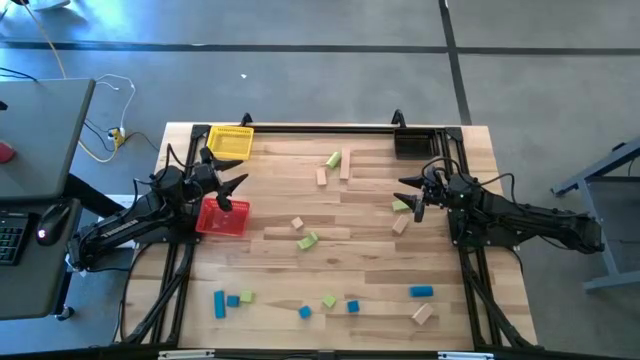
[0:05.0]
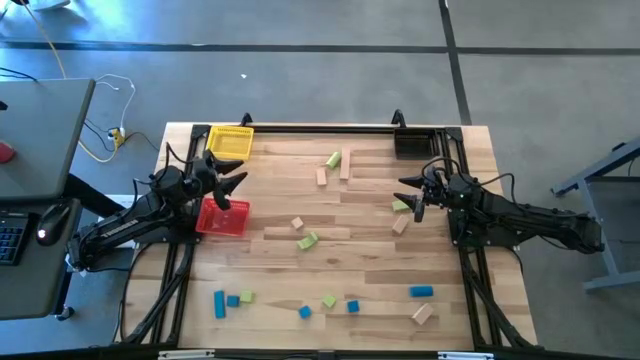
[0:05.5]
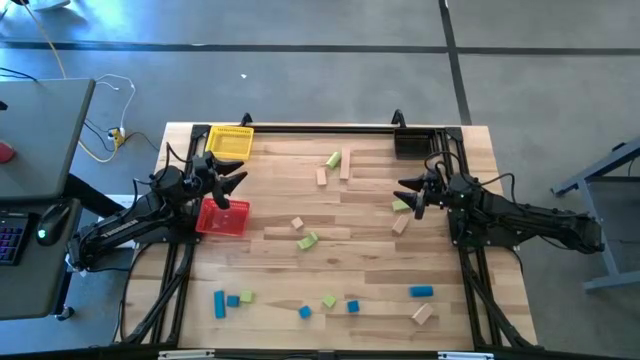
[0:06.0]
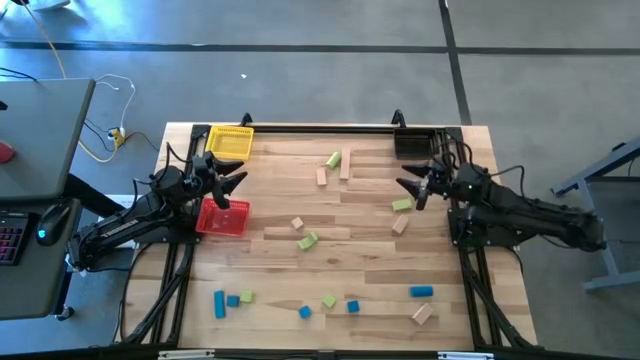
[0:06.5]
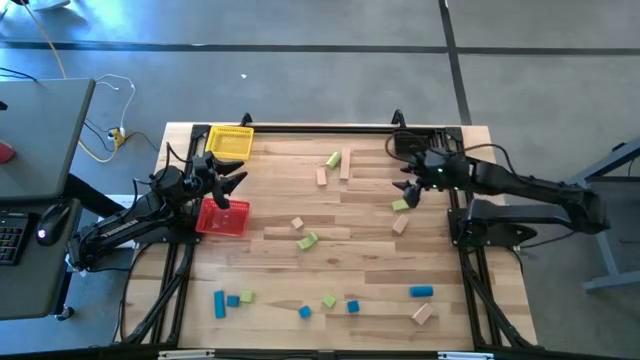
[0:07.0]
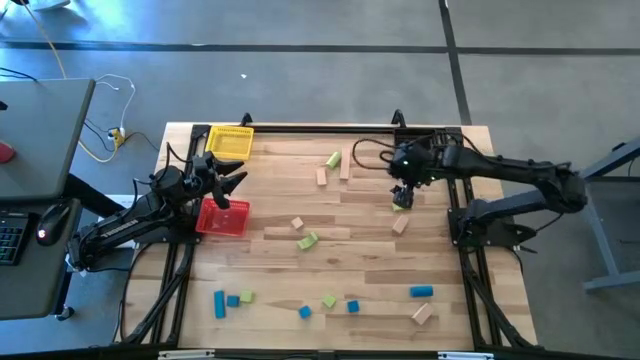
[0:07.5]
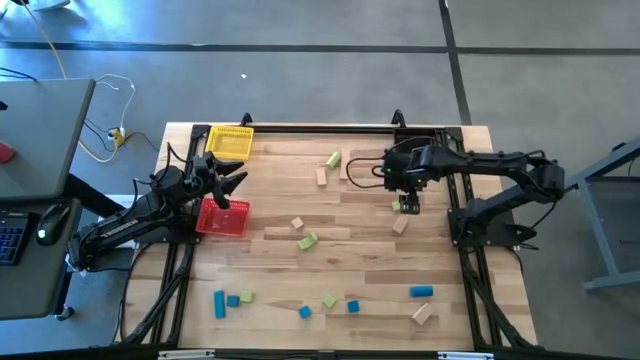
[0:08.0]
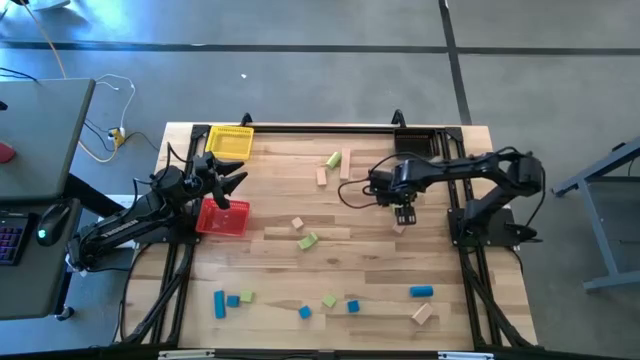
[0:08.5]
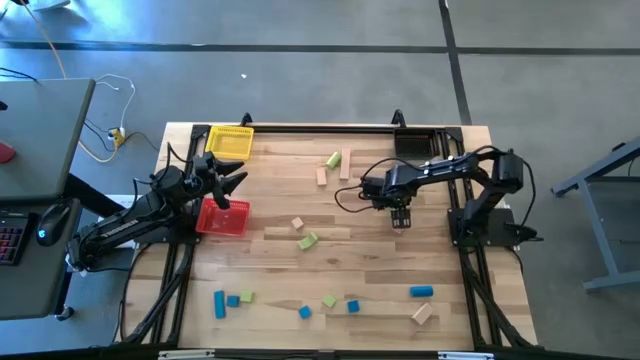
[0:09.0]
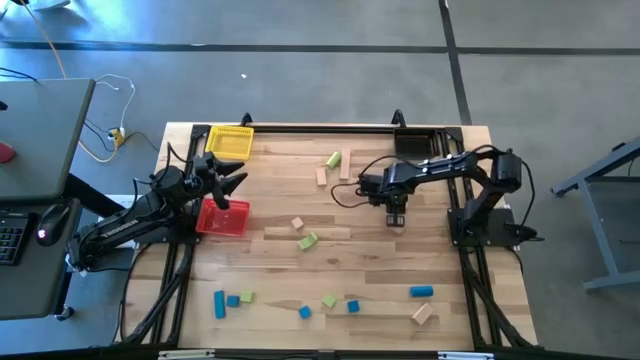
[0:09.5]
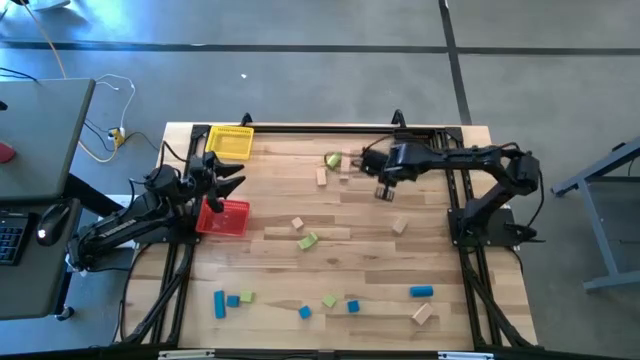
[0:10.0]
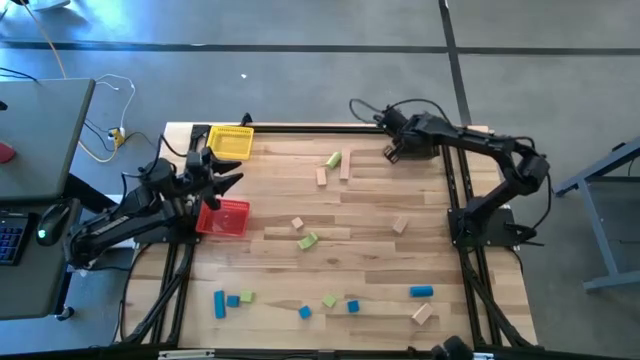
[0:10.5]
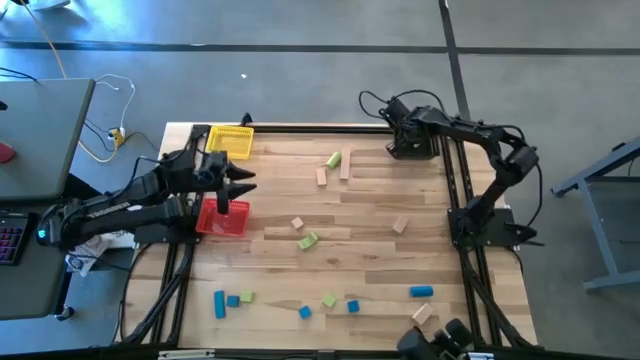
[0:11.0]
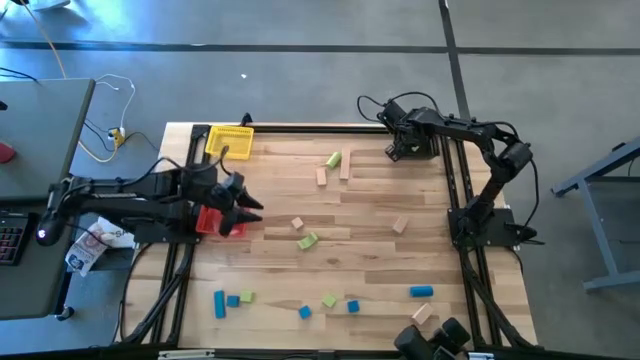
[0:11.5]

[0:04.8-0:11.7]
Task: Sort & place blocks by color
Put the green block into the black bin

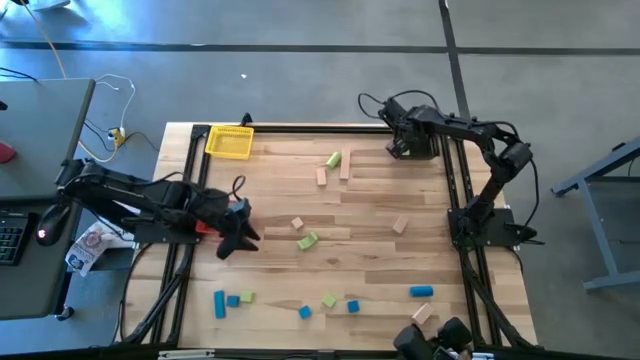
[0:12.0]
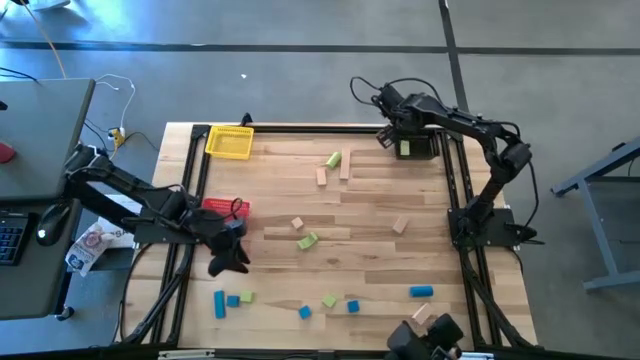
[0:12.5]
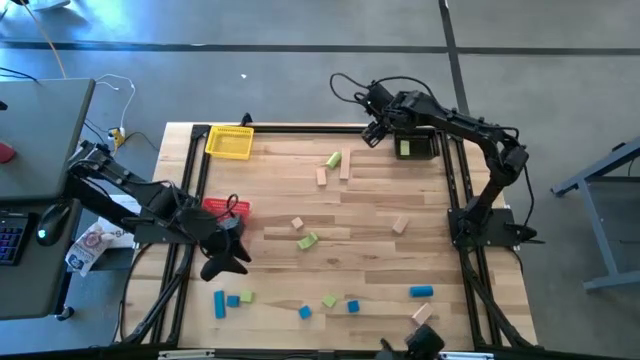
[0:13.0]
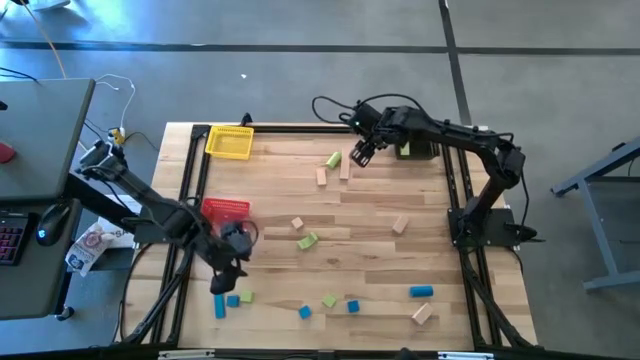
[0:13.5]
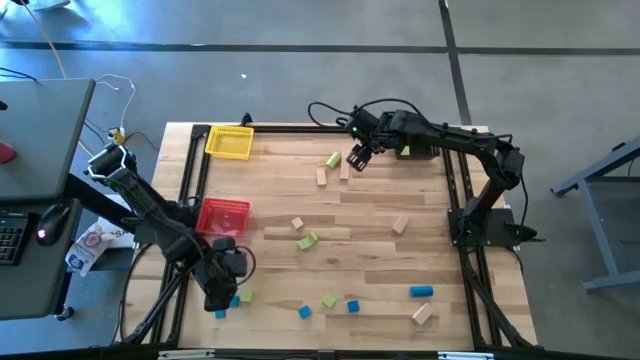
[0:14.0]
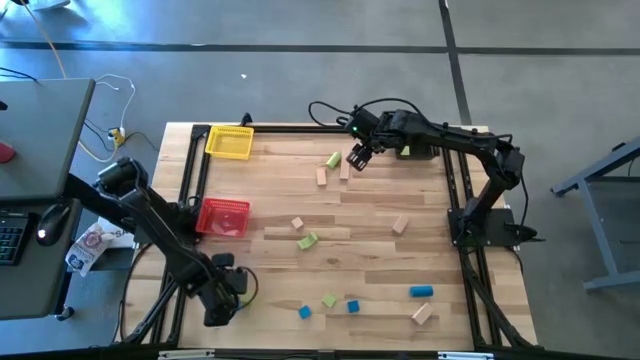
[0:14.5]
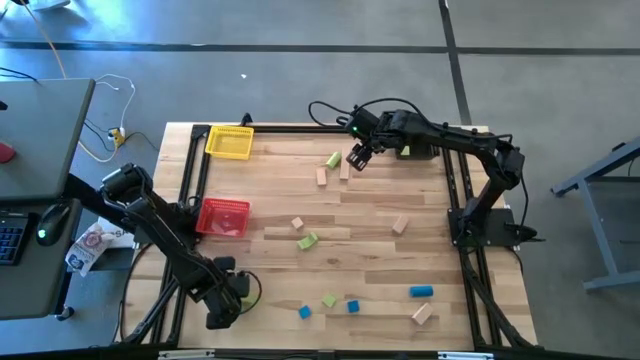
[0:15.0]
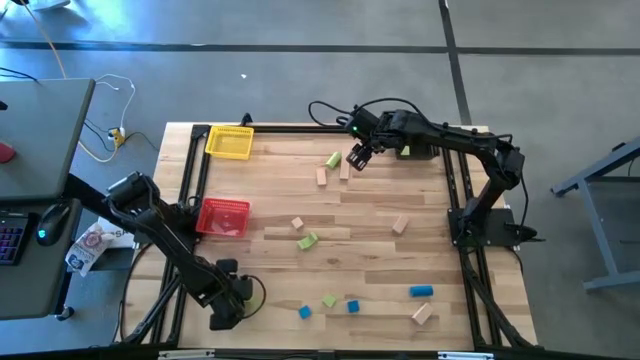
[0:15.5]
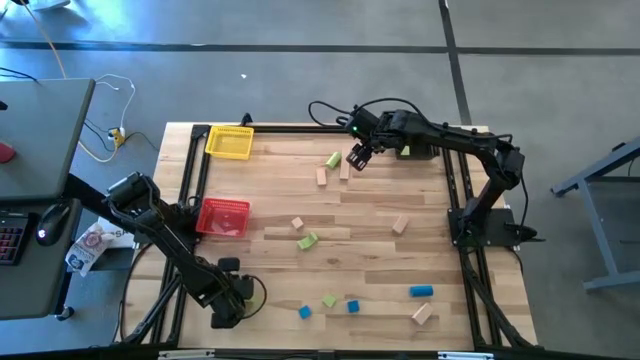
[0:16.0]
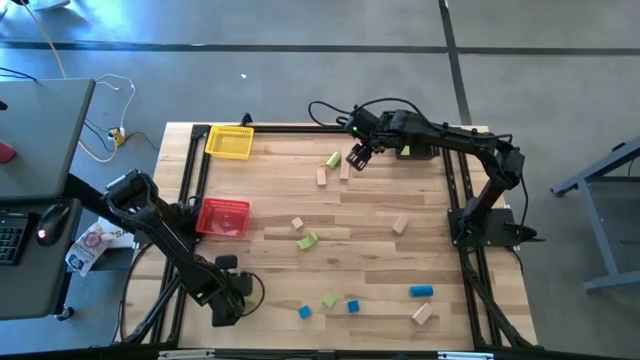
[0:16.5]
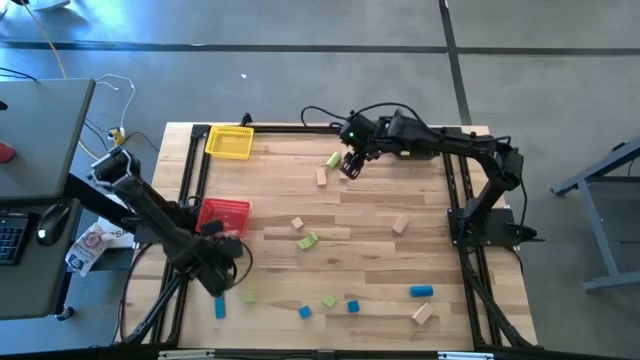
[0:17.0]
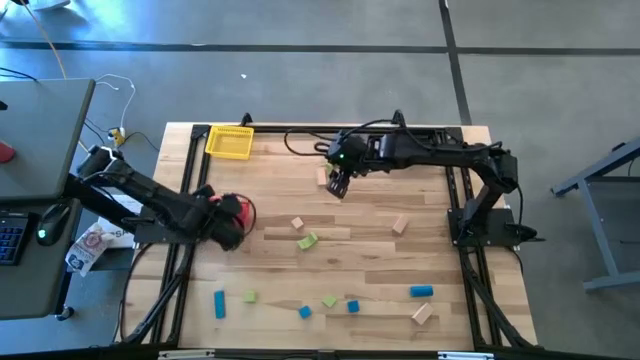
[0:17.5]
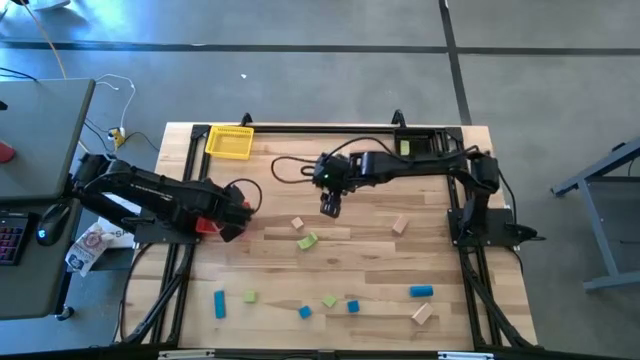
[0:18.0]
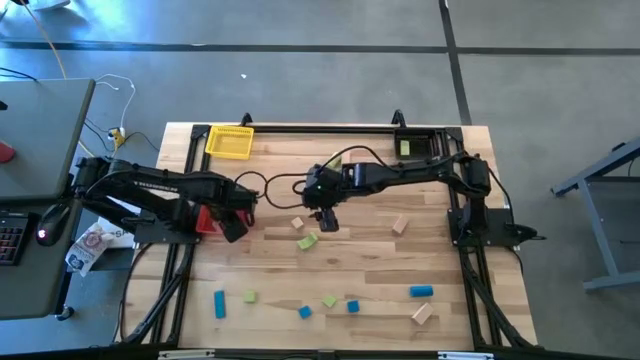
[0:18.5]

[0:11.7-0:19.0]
Put the blue block into the red bin

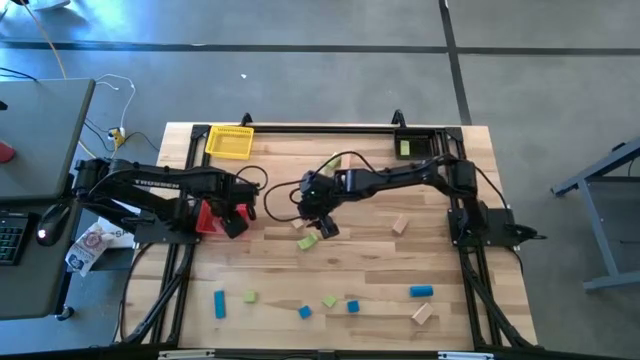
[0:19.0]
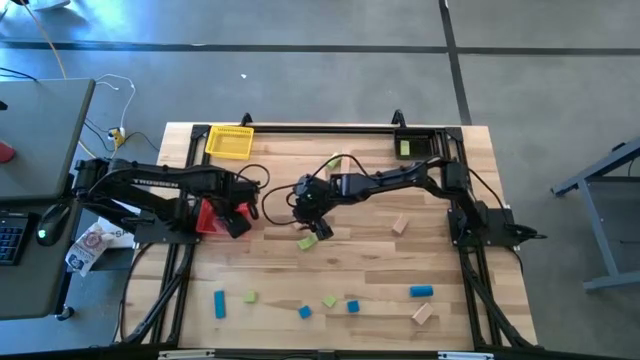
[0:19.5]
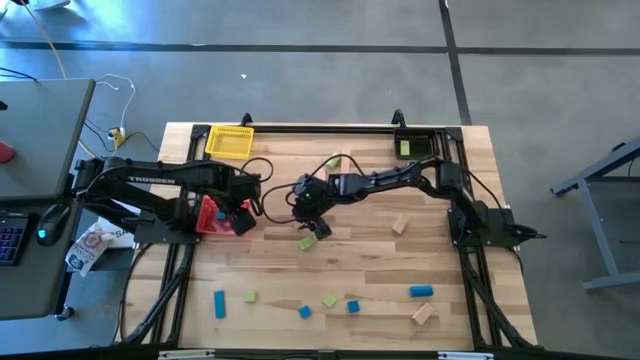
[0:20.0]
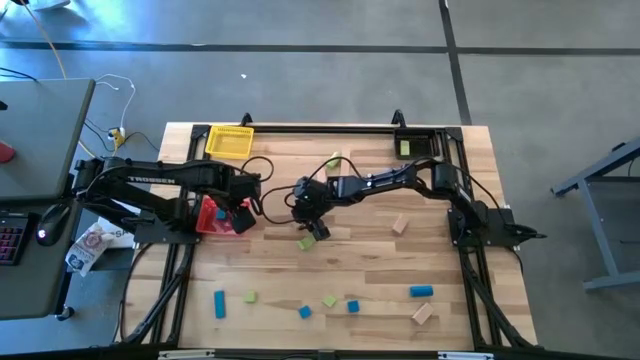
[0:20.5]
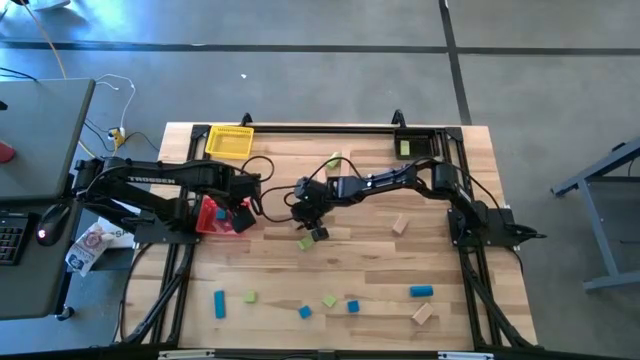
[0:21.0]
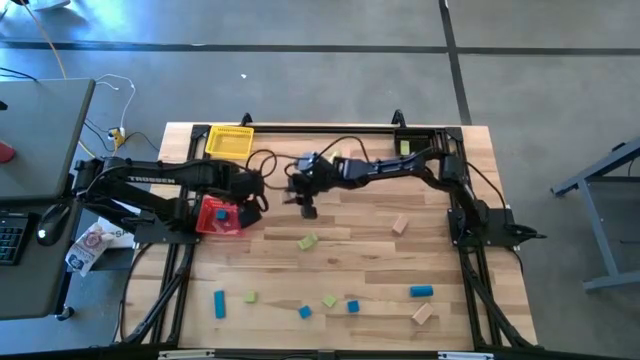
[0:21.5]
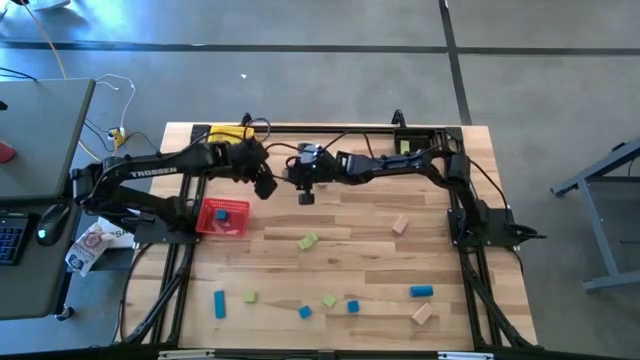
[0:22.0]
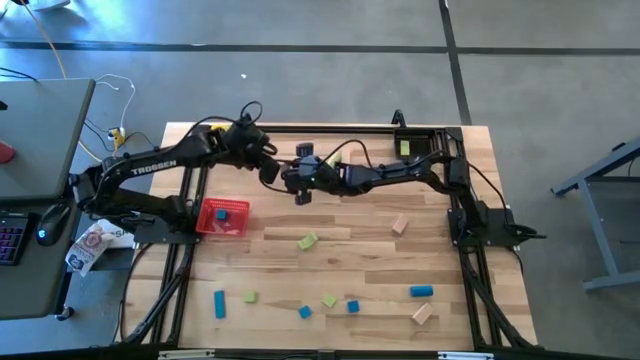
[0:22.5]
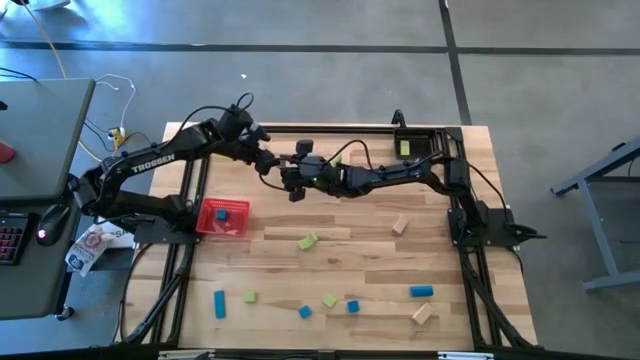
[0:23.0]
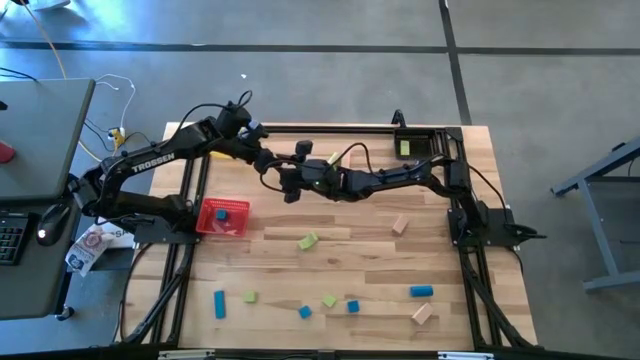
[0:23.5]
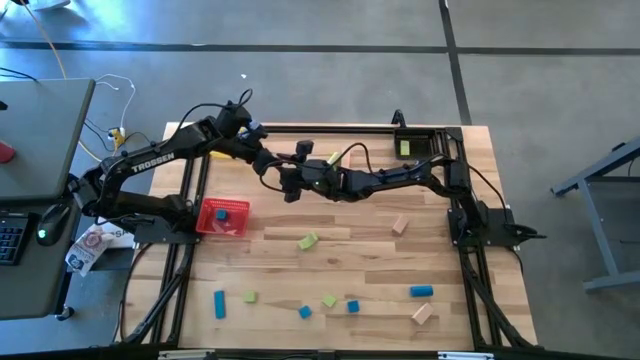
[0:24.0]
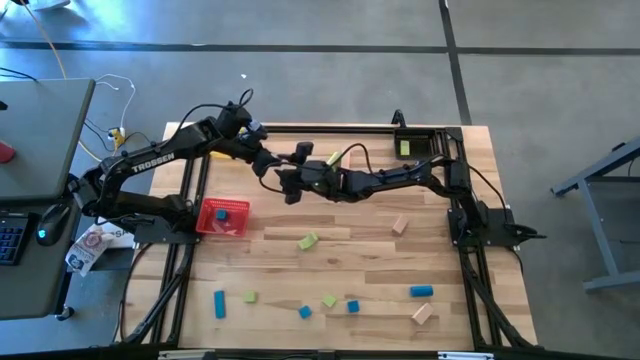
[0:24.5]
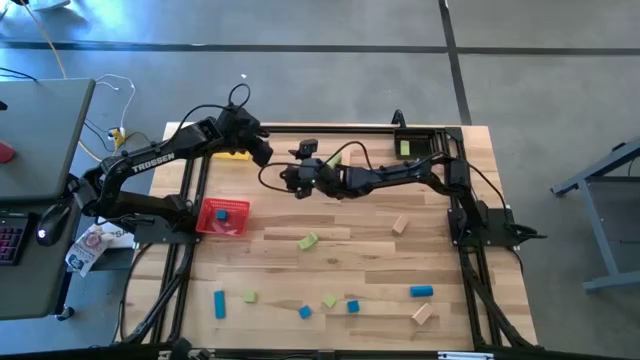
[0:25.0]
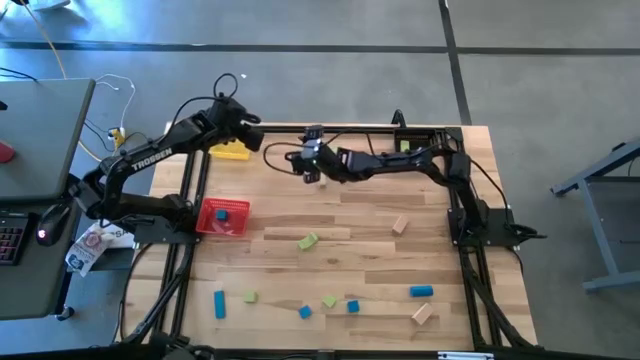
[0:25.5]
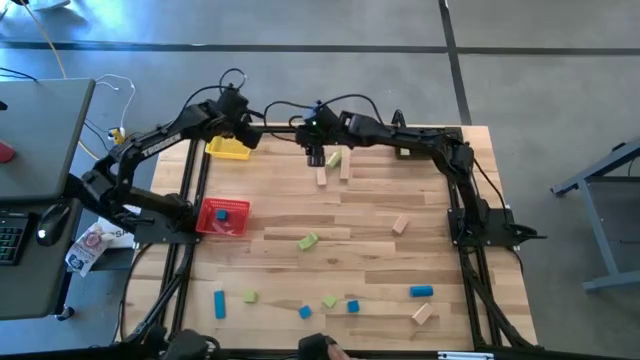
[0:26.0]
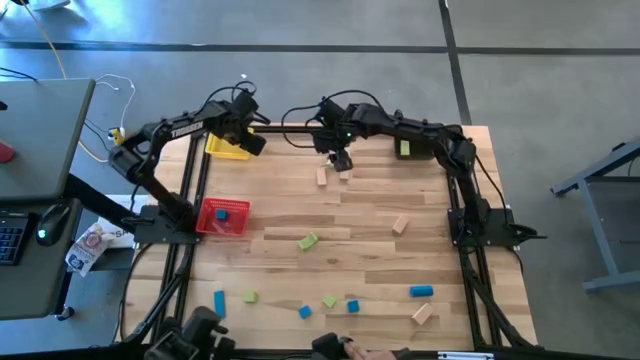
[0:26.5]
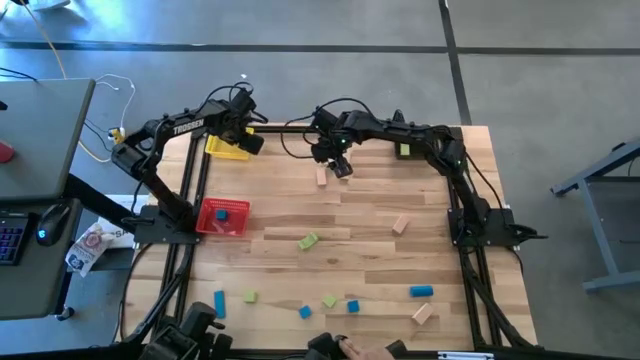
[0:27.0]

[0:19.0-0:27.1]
Put the brown block into the yellow bin
